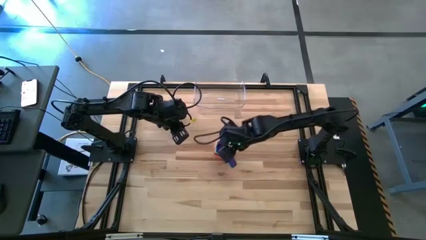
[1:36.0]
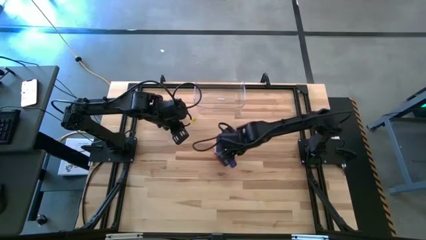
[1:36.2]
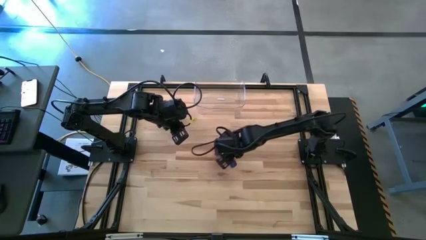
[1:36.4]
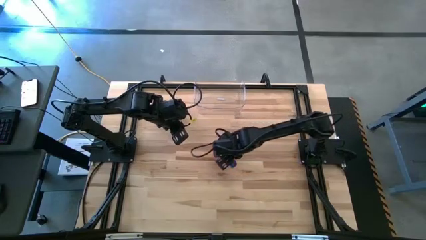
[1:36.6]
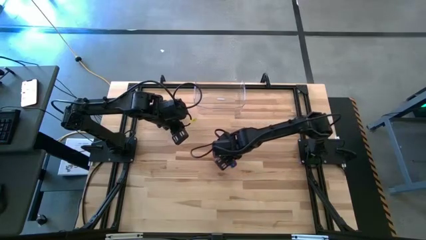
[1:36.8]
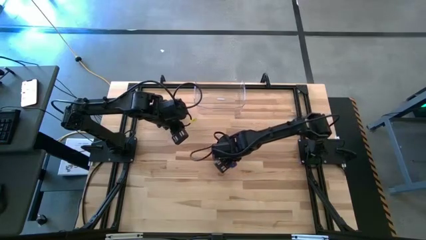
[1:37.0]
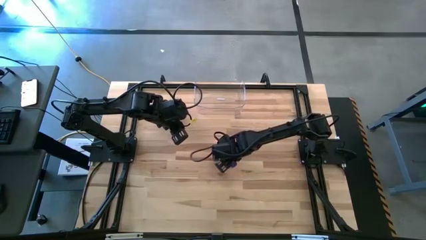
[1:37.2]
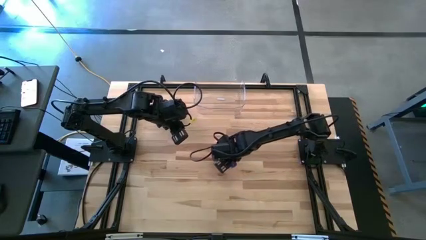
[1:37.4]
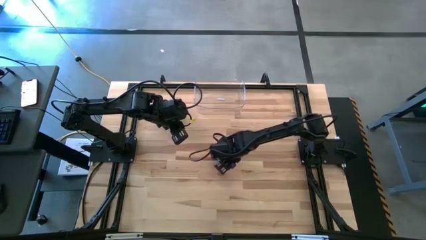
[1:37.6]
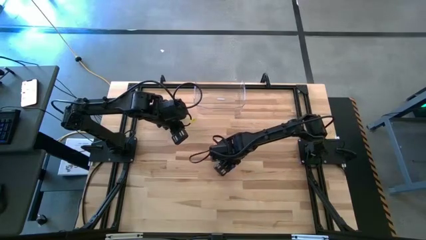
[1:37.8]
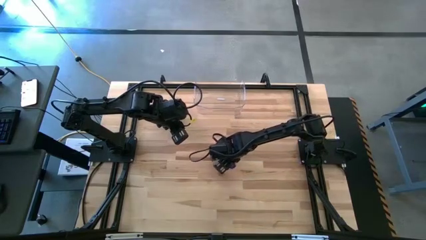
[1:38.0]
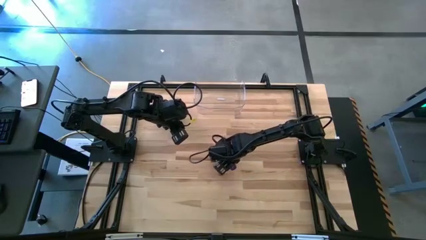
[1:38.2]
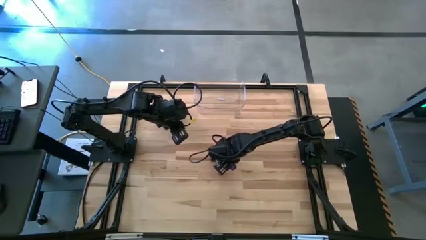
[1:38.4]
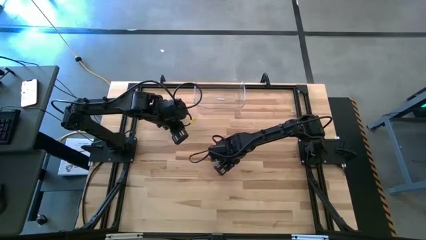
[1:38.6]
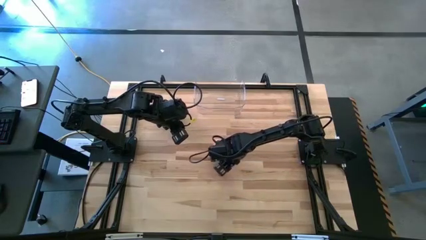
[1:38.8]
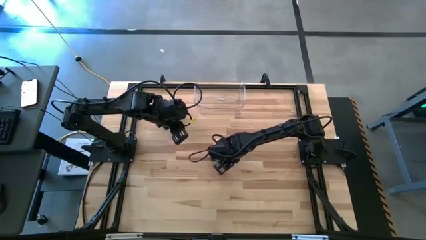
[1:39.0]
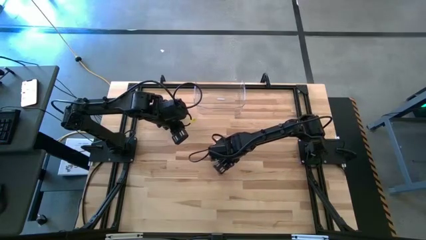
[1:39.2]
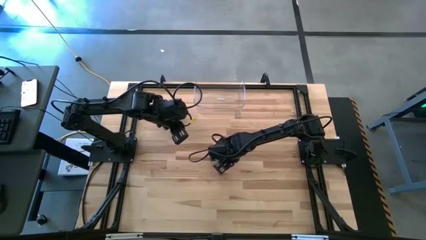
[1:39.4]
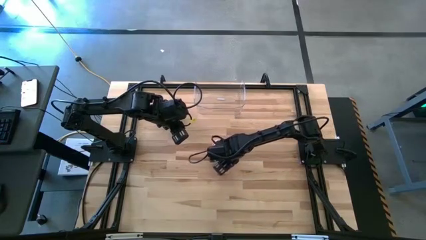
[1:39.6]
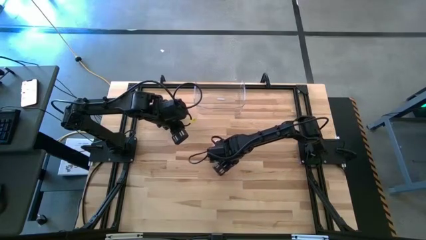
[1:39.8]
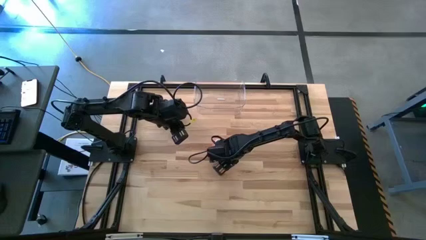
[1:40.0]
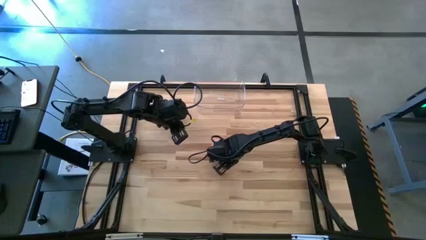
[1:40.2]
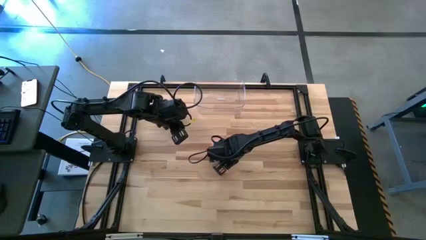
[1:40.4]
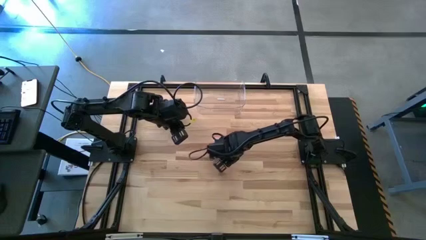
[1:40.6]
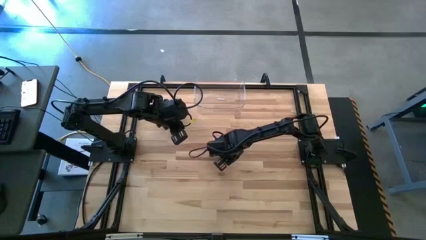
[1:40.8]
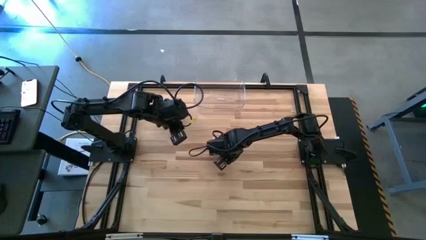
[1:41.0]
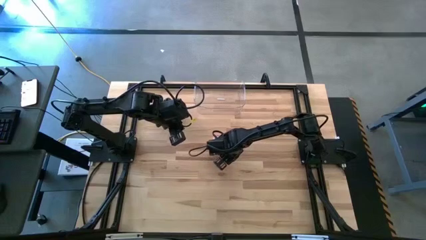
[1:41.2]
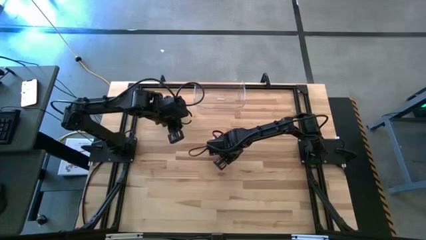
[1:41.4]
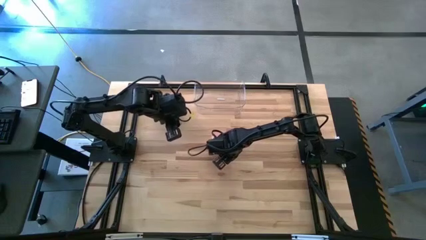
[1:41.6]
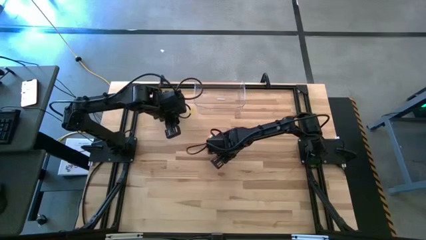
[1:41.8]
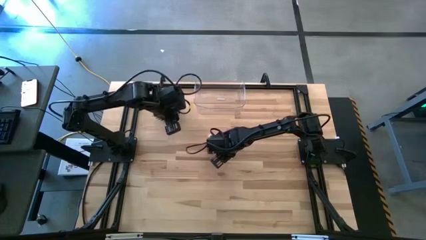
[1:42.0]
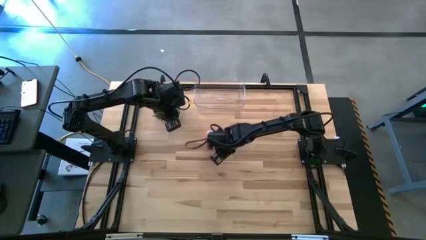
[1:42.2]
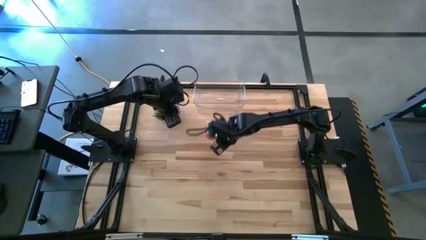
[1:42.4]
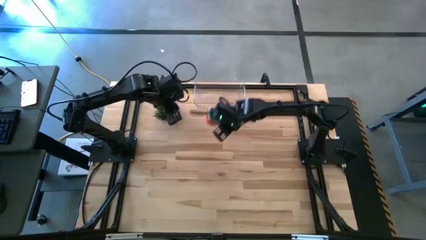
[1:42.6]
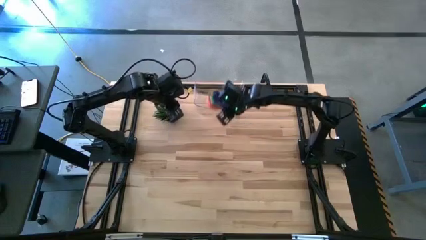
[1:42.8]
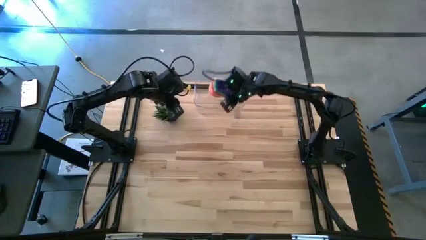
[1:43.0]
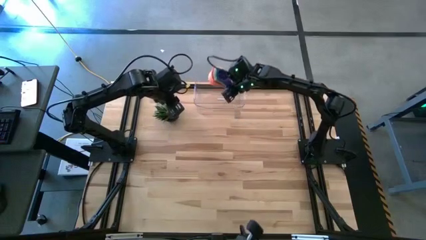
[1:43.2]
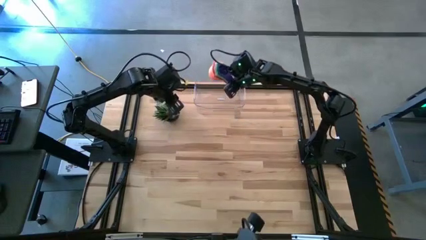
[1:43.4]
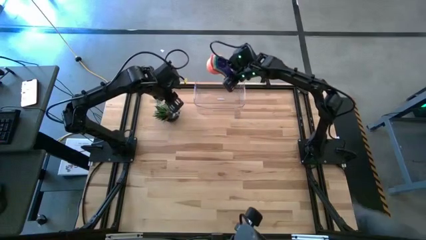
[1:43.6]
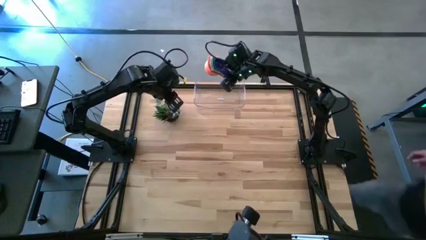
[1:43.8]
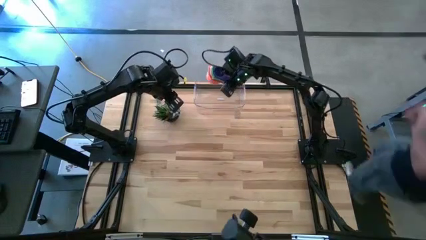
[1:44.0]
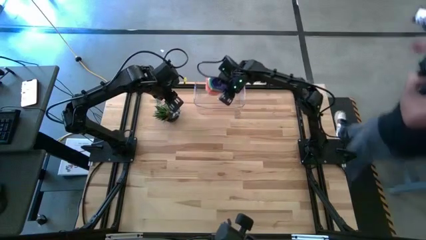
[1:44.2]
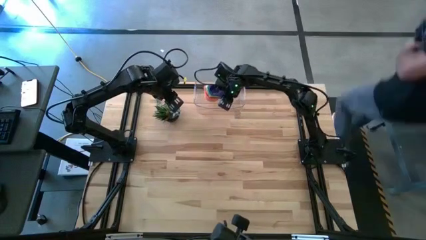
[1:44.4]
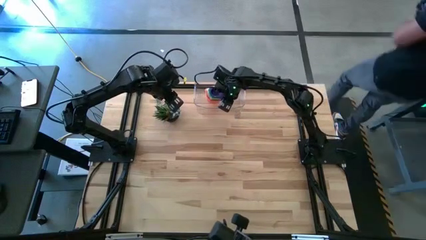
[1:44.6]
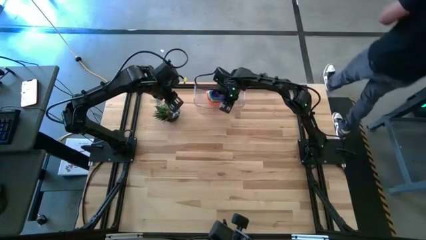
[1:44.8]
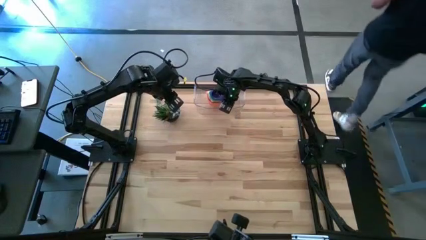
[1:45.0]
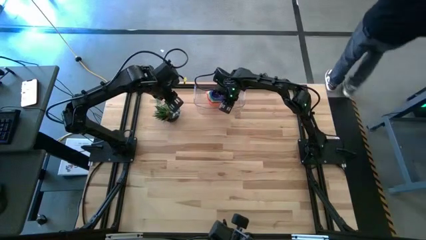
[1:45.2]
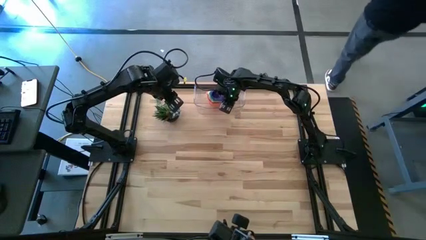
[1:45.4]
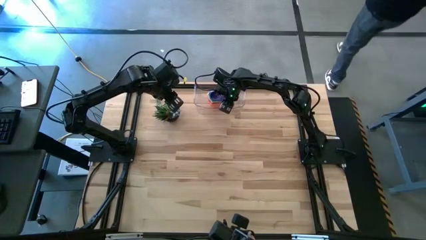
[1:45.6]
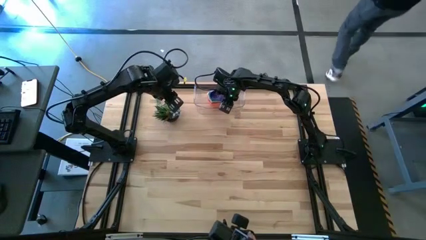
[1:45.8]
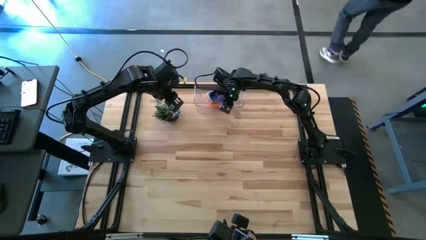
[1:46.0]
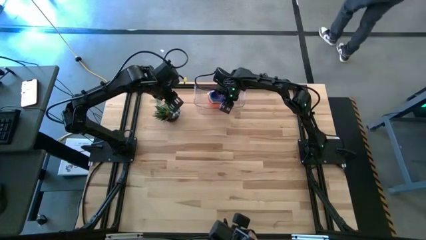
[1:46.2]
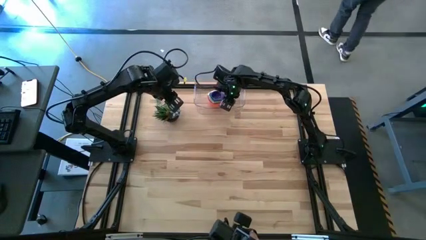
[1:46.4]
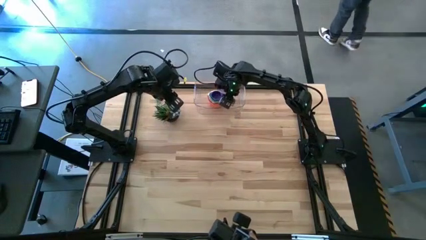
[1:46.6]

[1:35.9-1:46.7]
Task: Nest measuring cups in basket
Put the nested measuring cups into the transparent bin

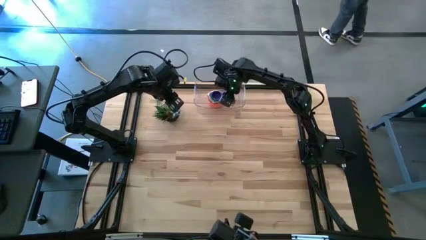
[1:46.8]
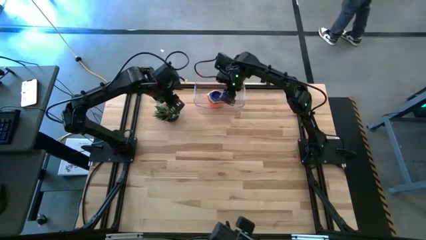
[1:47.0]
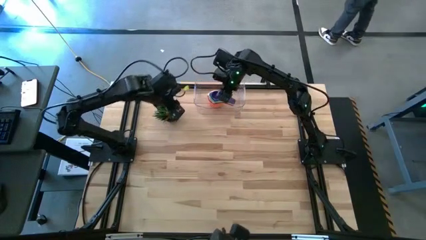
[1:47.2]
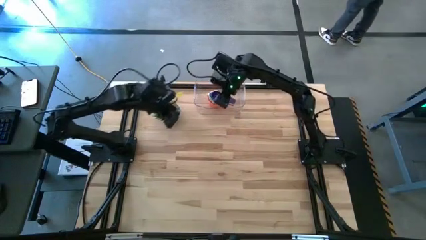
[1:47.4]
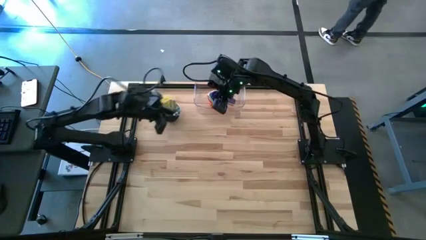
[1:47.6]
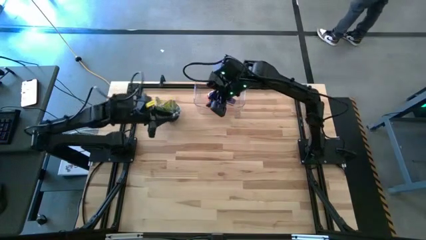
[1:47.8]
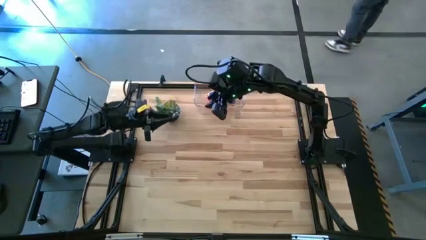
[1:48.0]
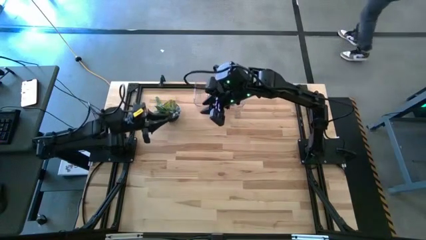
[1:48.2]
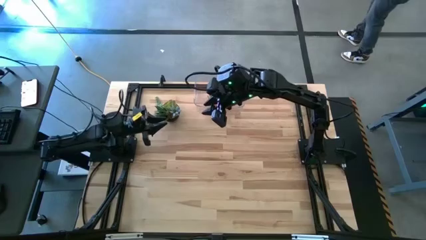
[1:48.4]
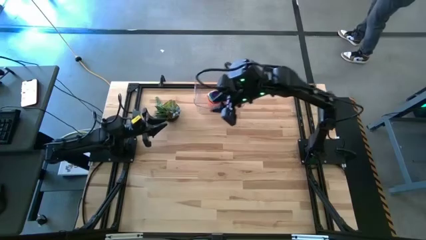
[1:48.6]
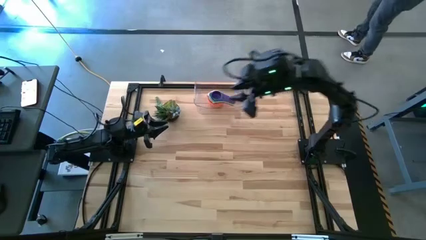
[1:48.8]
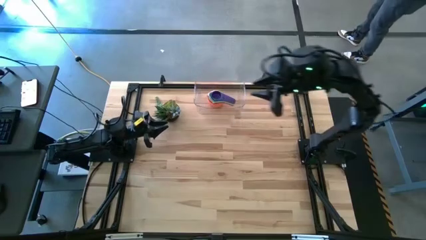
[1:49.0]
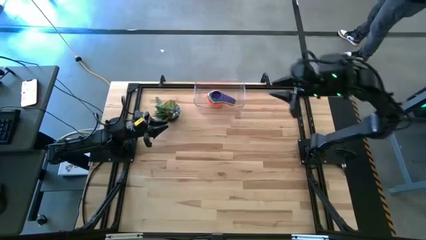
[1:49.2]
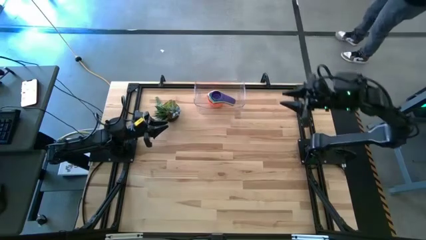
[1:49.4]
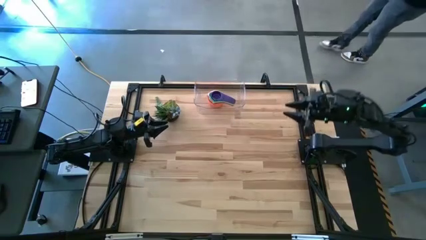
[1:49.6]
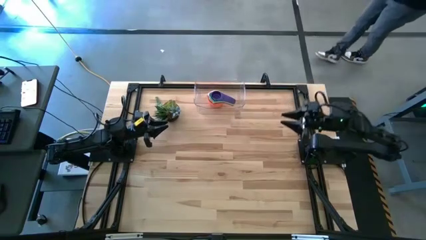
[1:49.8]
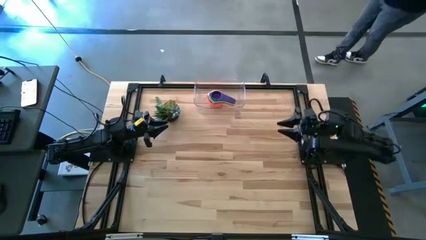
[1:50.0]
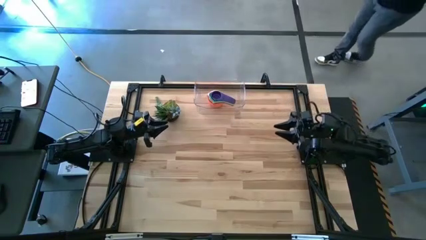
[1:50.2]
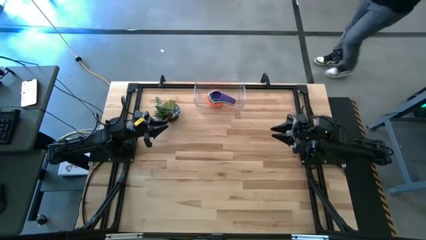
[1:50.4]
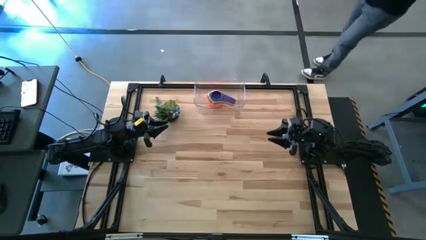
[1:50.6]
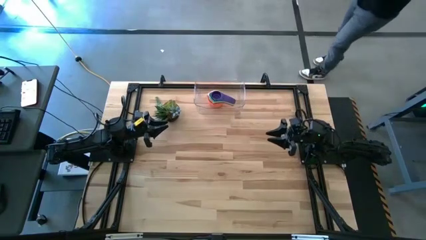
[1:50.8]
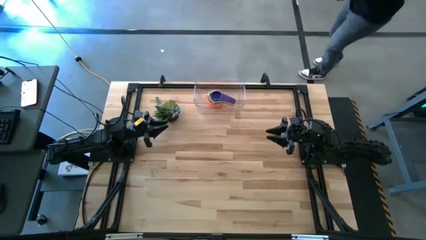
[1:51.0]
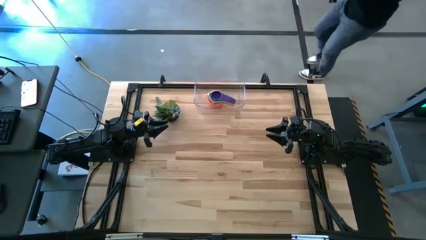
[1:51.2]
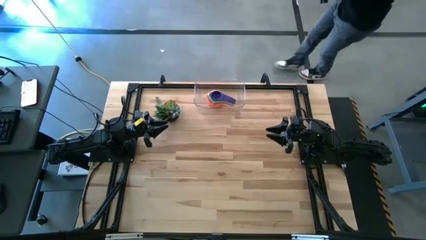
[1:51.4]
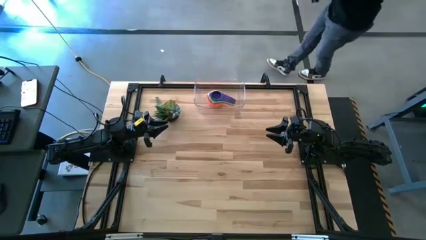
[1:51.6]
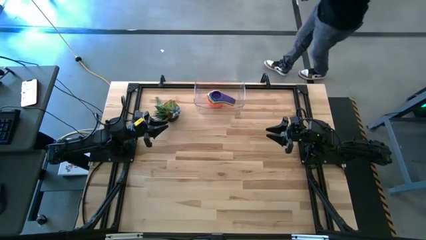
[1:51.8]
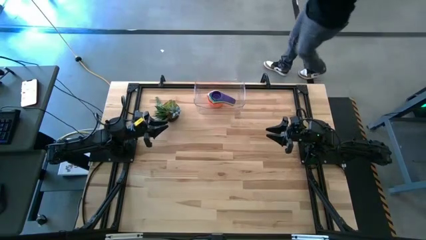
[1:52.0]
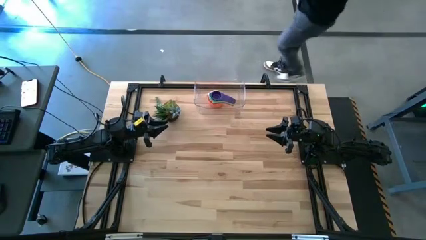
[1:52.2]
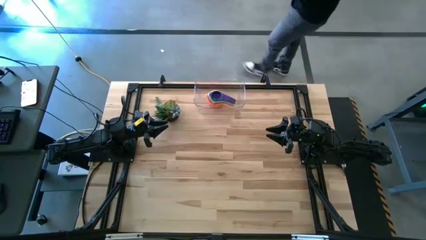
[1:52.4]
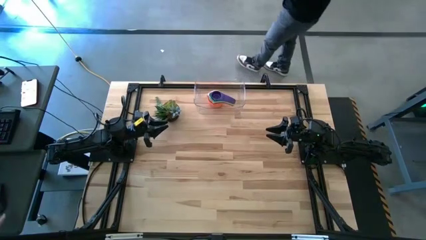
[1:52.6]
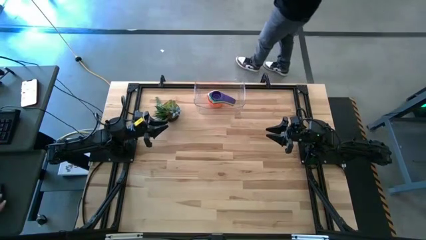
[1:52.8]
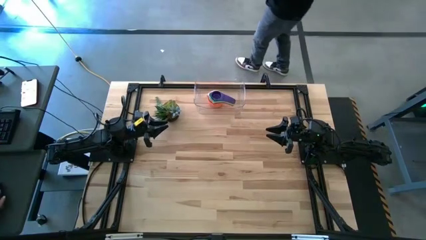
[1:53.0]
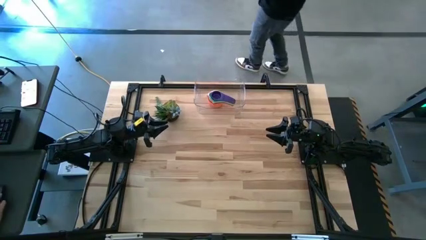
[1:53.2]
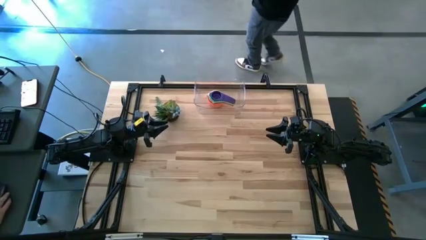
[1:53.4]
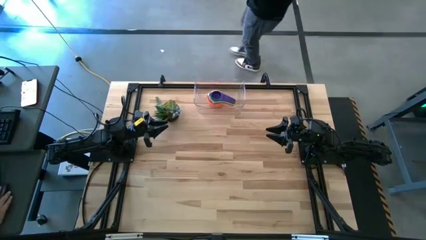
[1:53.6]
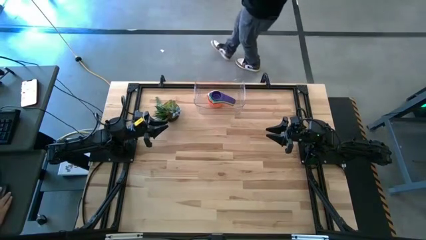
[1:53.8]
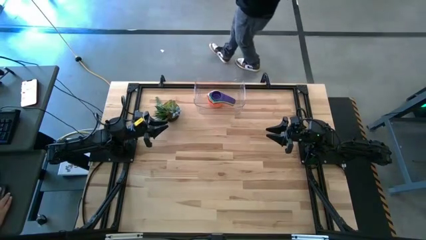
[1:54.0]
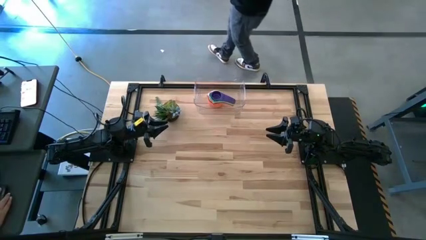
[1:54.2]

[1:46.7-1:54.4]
Return to Home Position
